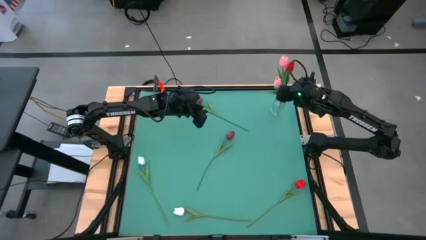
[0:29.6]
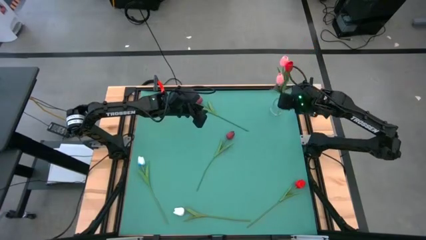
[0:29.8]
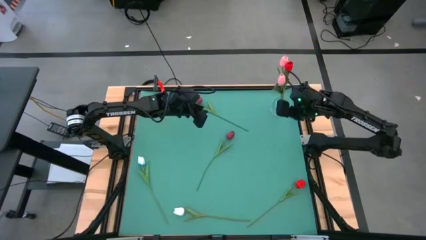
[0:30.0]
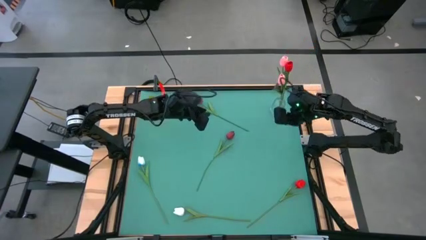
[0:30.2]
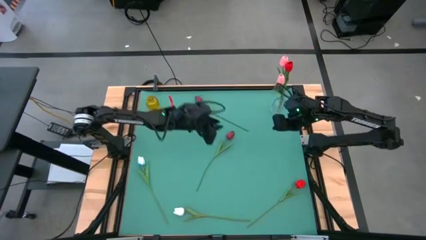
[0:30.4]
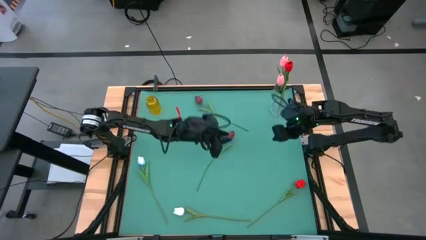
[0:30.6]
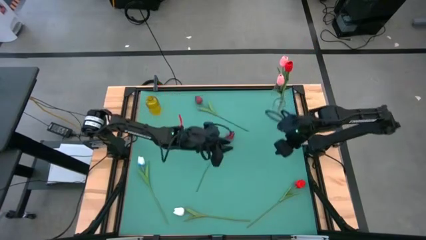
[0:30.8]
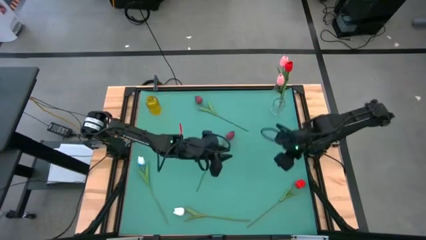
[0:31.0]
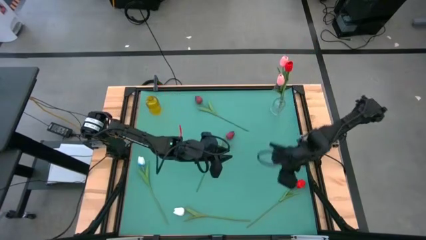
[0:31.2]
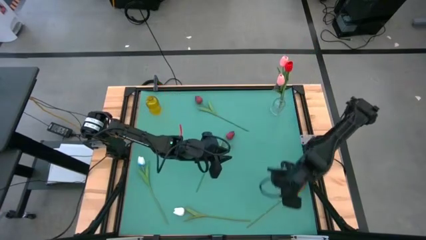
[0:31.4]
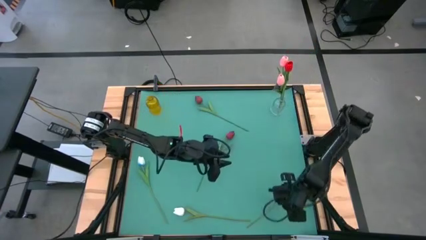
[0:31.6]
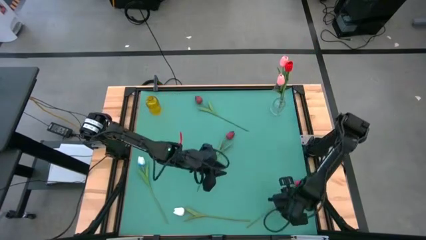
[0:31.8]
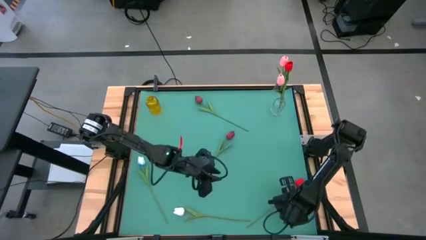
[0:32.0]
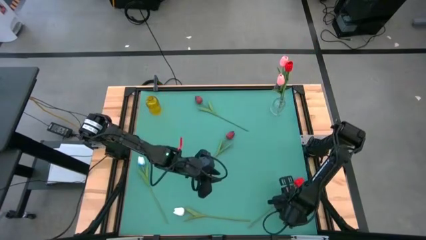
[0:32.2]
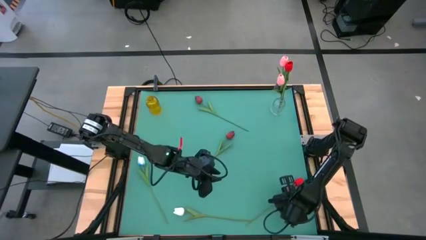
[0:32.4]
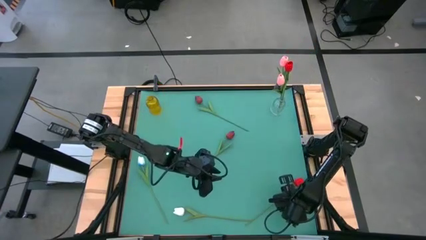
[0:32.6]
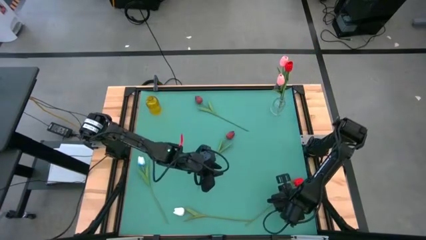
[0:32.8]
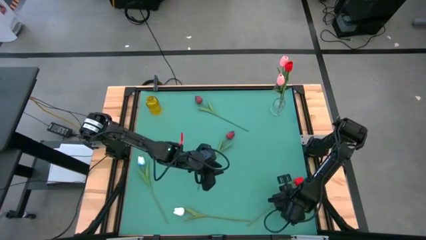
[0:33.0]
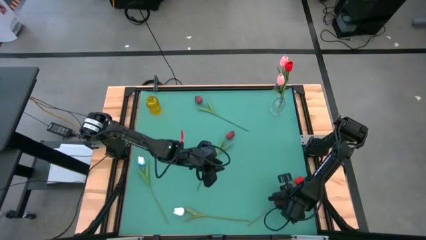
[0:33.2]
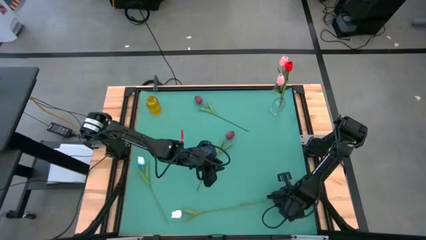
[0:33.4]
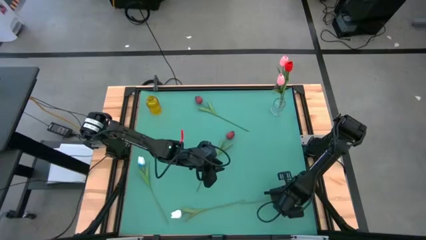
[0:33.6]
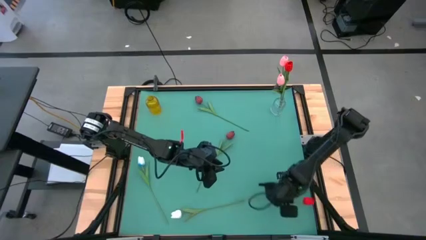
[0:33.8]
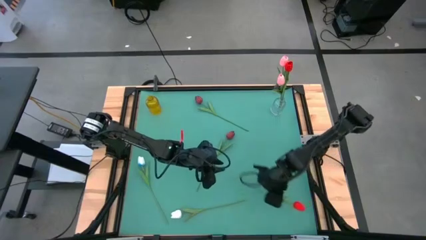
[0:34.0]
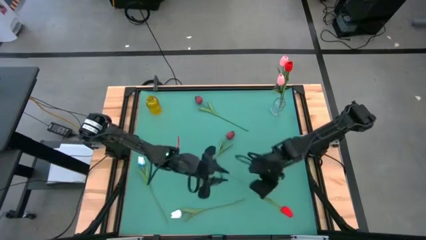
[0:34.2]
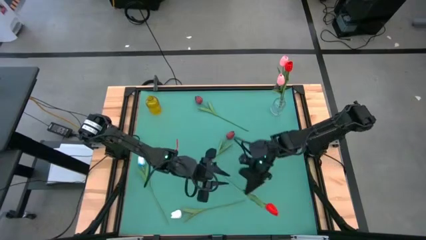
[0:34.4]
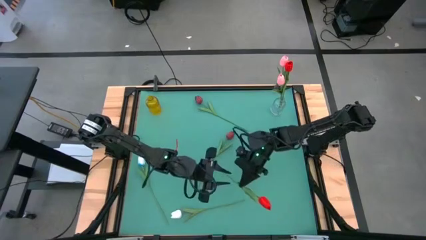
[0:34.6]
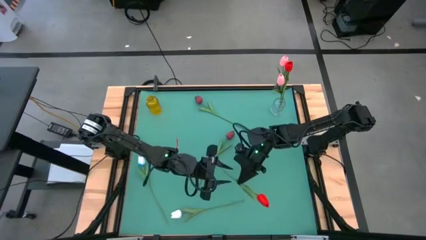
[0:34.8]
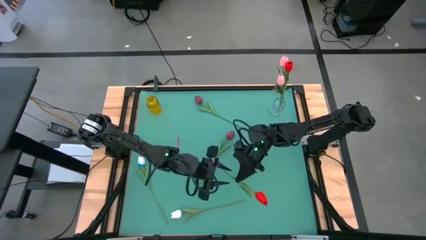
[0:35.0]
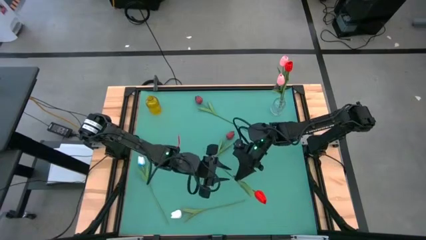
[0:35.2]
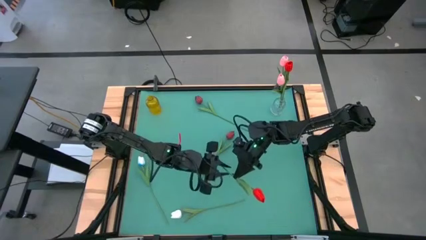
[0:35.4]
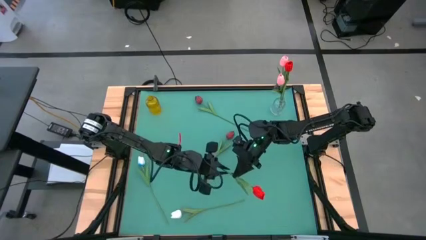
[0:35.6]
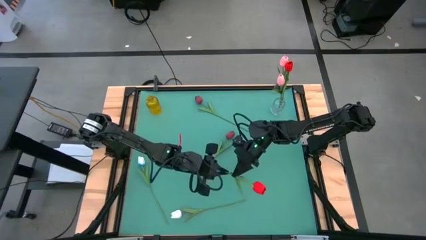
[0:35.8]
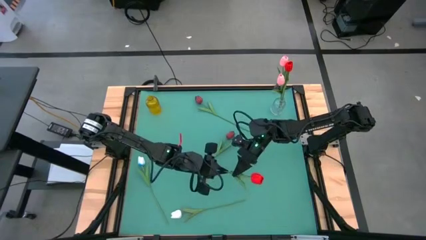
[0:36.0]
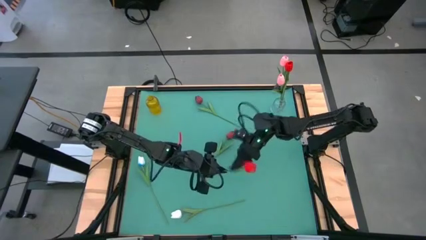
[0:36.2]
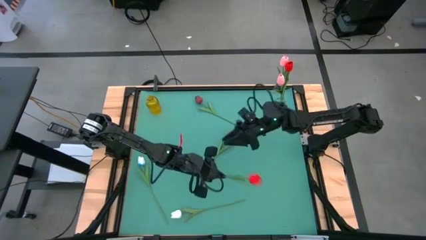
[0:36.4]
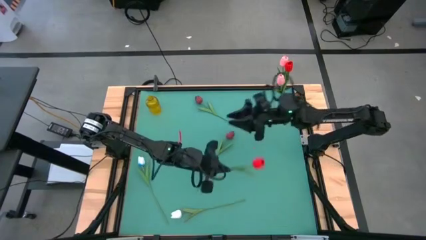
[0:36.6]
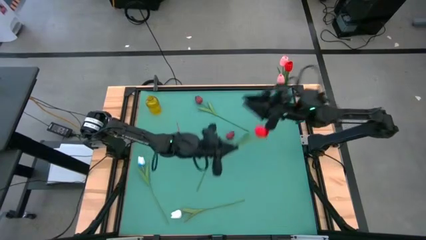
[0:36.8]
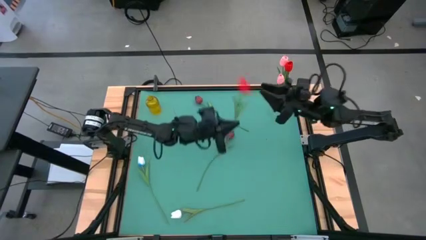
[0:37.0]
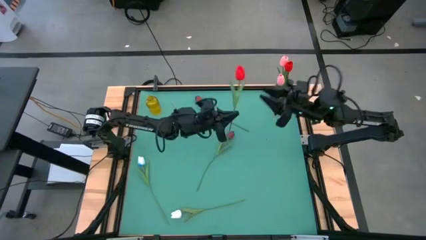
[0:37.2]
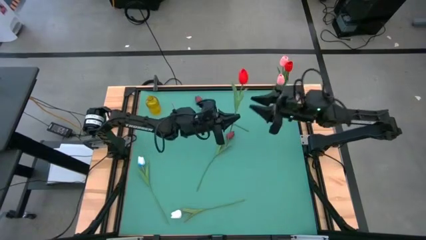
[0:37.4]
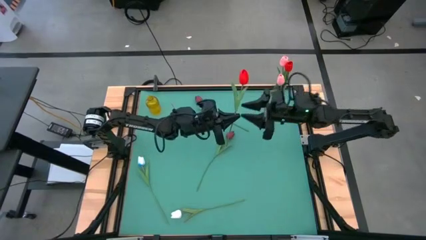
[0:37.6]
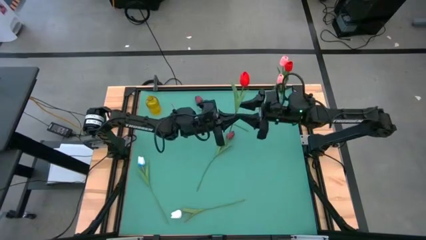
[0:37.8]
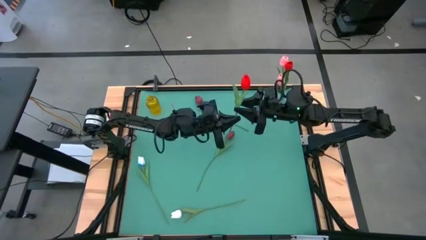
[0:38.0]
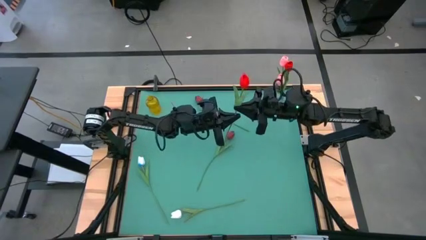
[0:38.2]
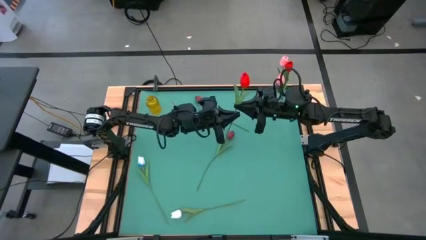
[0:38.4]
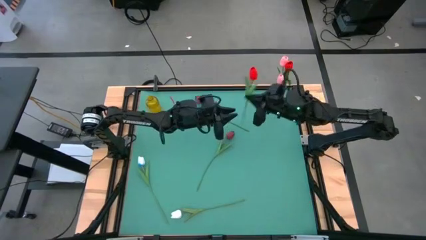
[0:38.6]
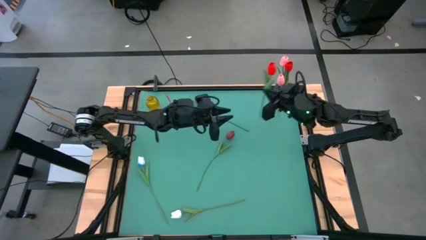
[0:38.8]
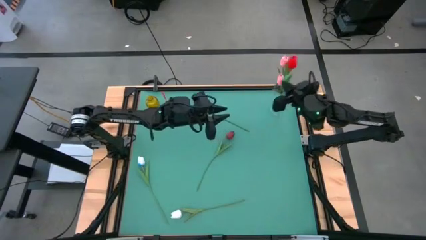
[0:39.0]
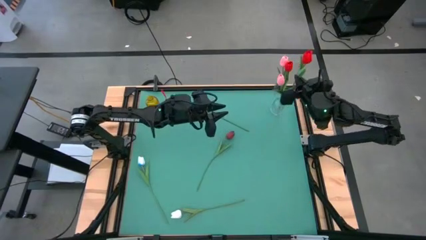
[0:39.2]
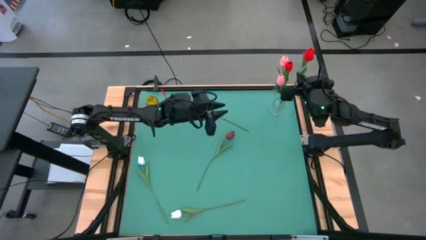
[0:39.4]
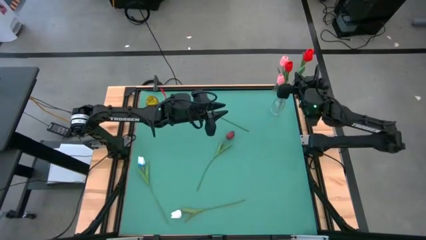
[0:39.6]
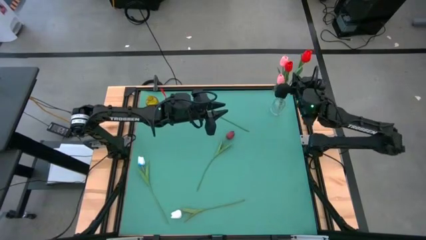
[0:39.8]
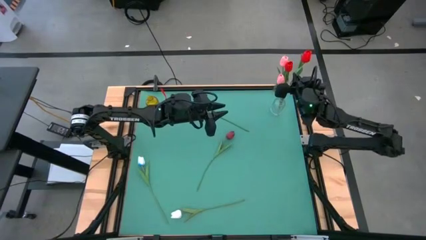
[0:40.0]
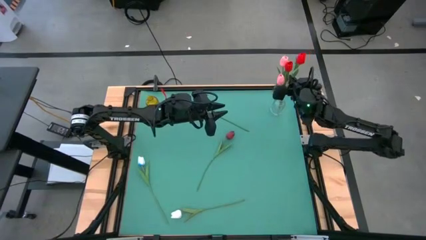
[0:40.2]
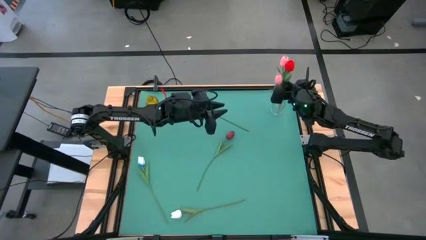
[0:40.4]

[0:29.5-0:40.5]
Task: Sort flowers into vase by color
Put the red flower into the transparent vase

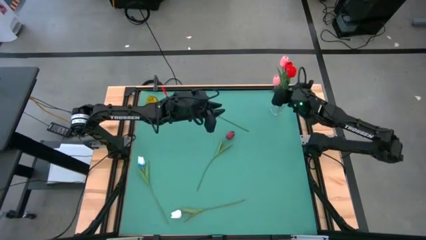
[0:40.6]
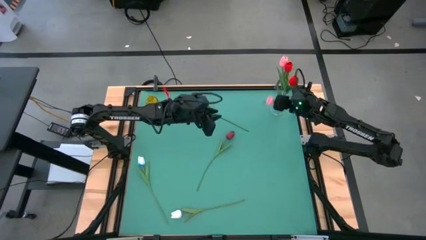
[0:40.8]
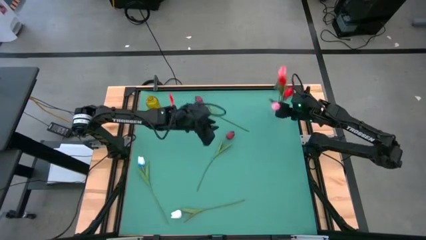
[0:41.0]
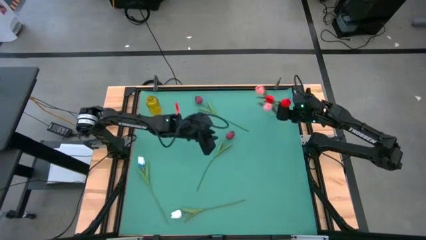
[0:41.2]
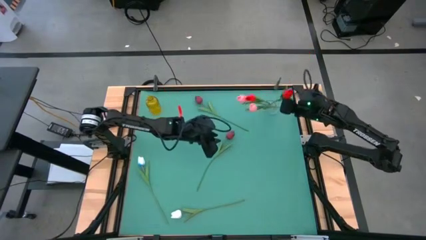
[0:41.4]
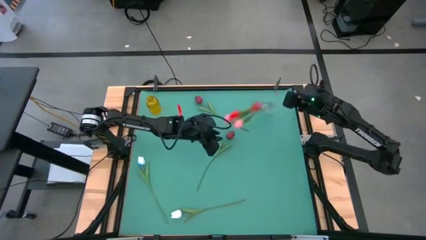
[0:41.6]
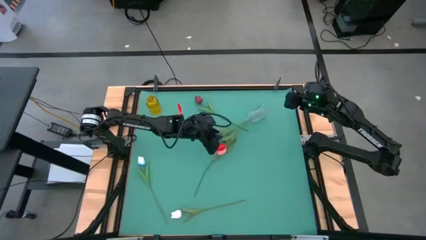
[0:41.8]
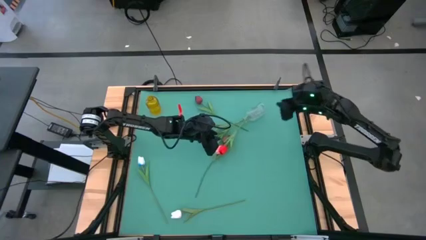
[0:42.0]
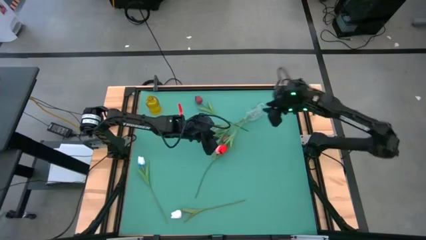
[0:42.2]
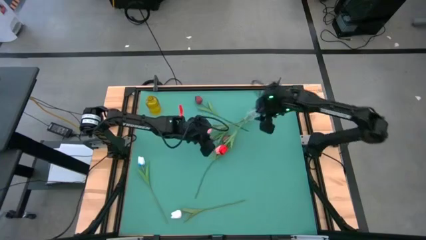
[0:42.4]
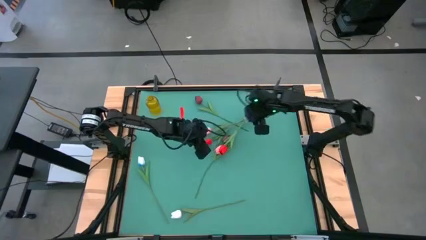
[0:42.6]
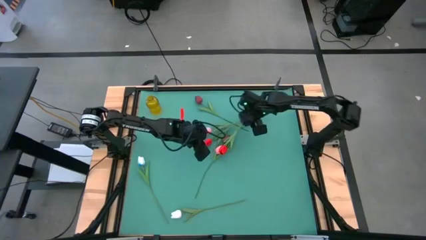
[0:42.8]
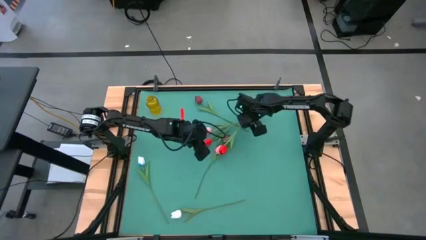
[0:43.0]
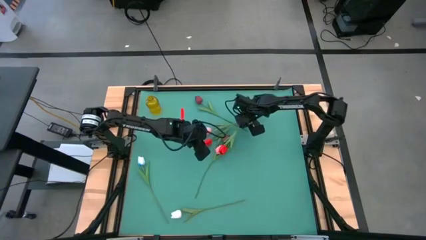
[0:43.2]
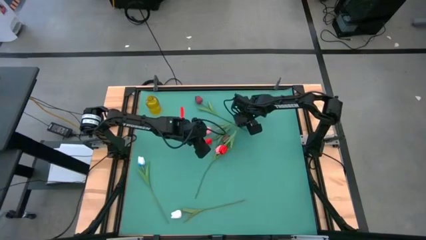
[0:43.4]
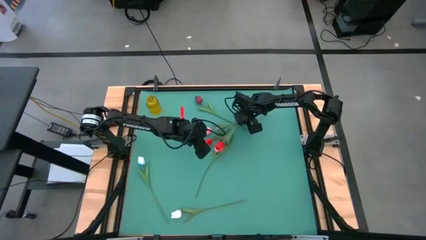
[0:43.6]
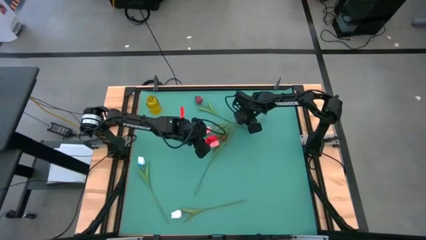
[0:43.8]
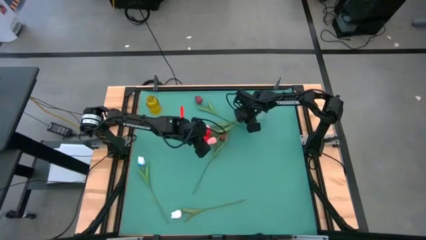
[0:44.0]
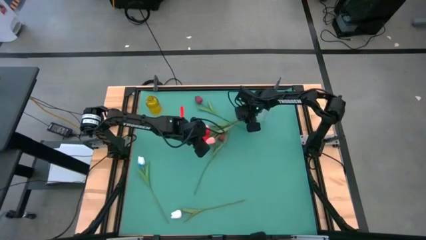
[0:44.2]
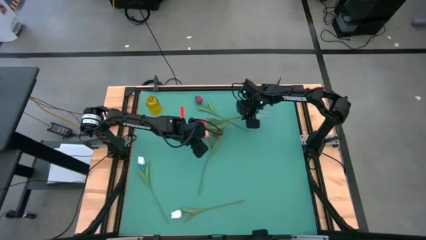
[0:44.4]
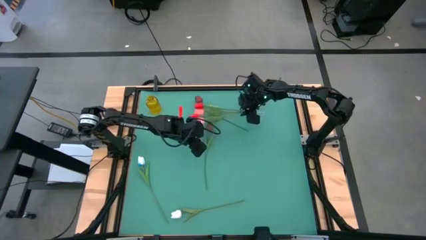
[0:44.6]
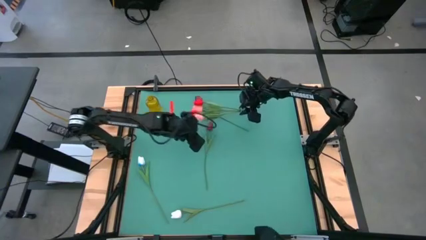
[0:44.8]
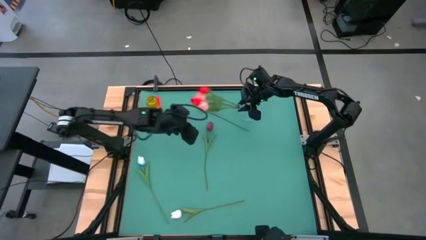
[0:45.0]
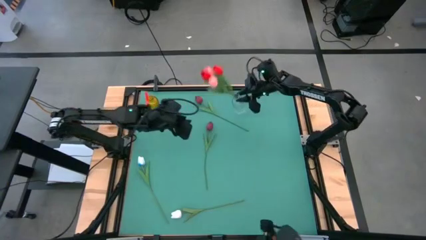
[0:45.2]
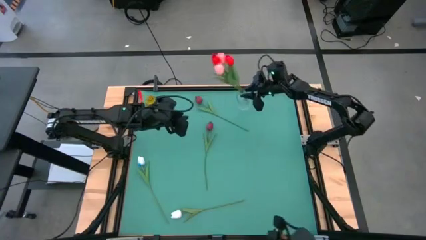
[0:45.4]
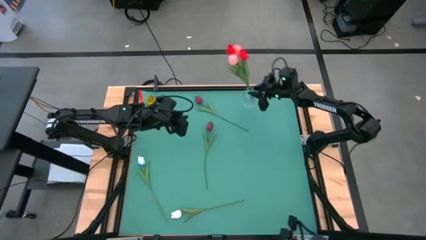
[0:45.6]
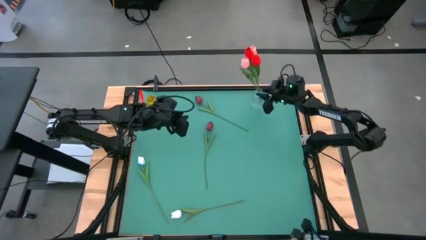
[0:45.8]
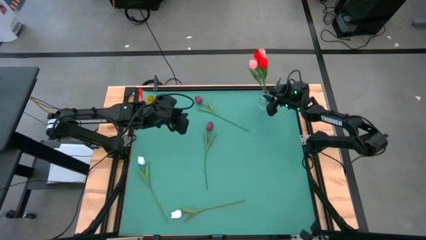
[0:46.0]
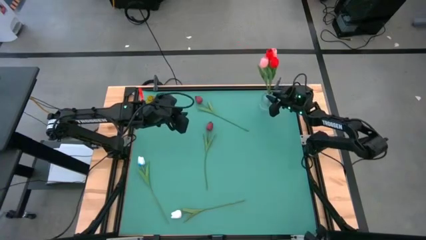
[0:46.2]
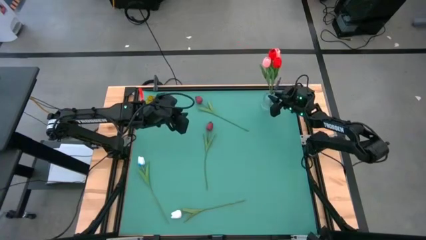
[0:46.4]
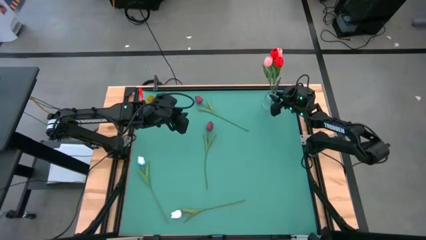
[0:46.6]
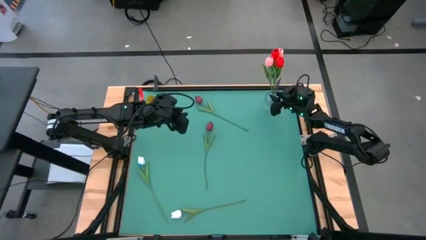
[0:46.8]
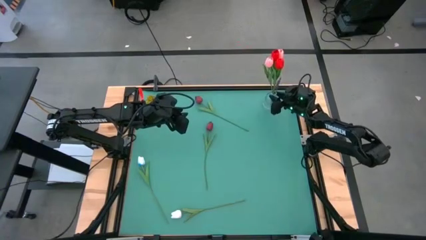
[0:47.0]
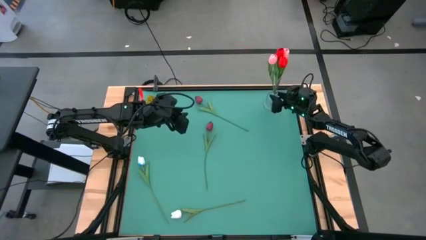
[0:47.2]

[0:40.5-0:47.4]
Adjust the transparent vase
